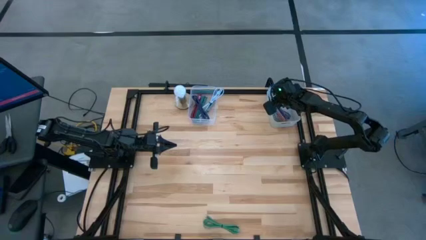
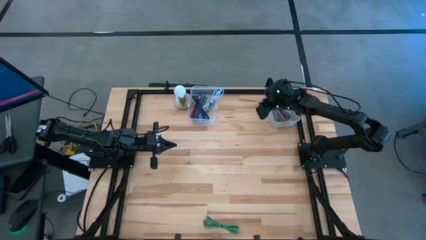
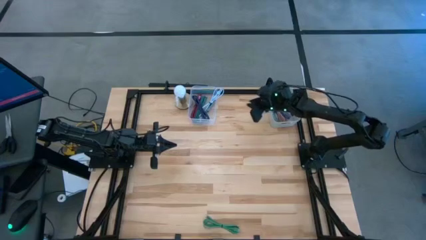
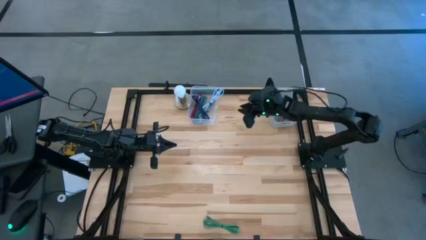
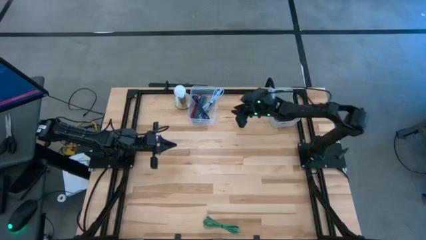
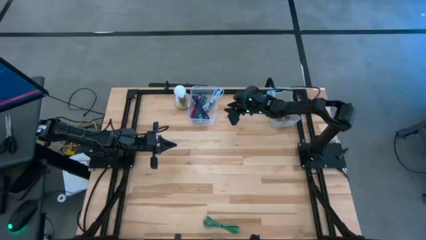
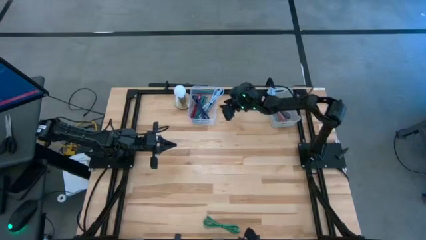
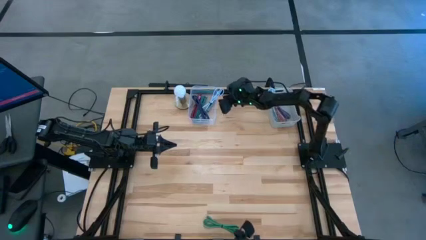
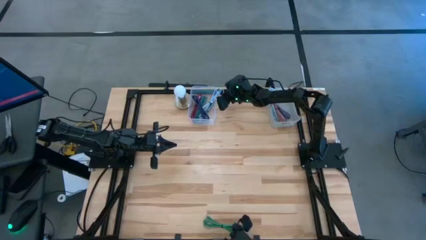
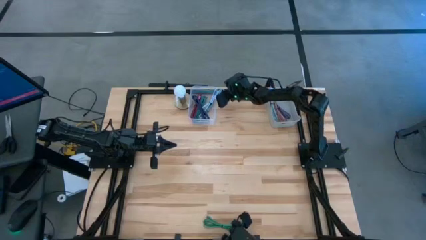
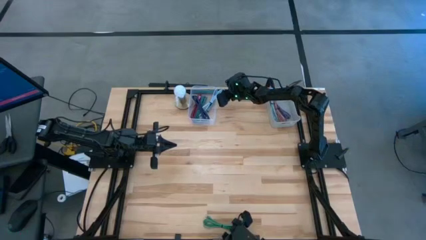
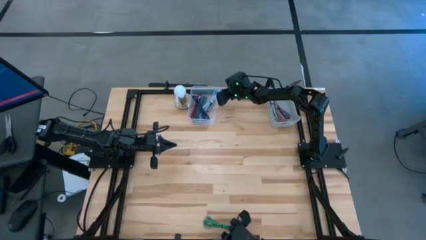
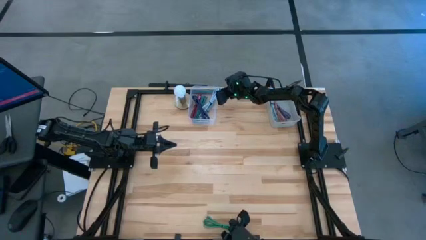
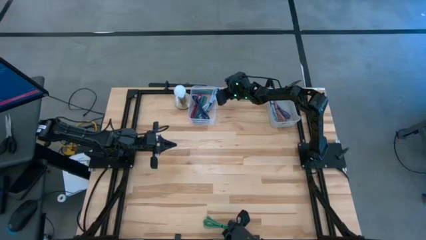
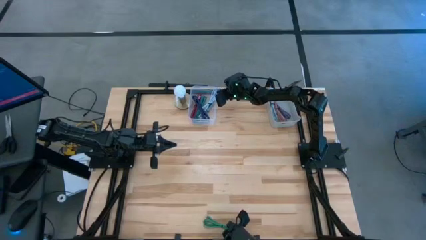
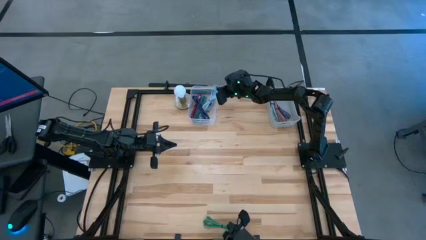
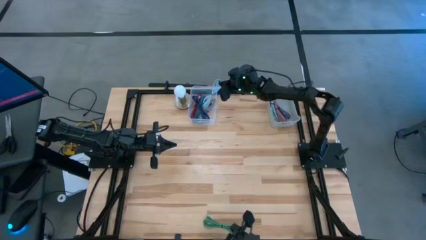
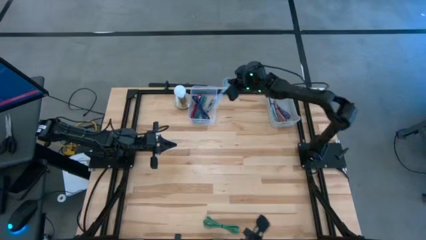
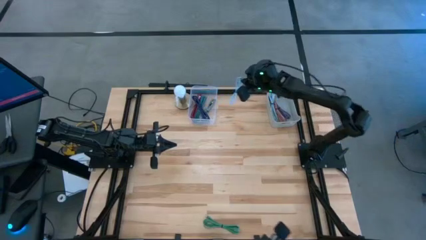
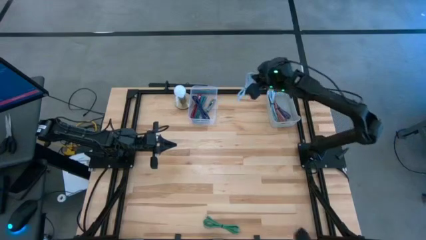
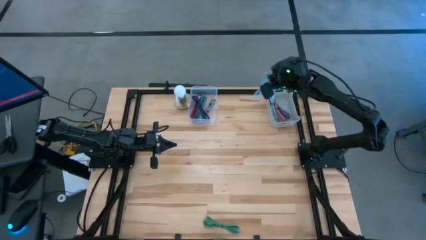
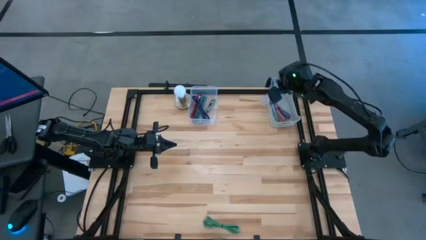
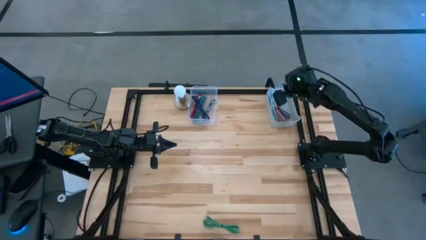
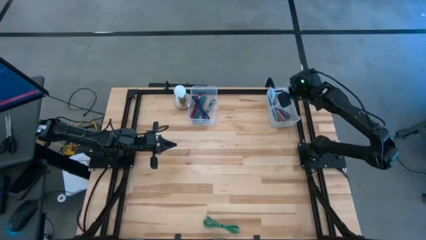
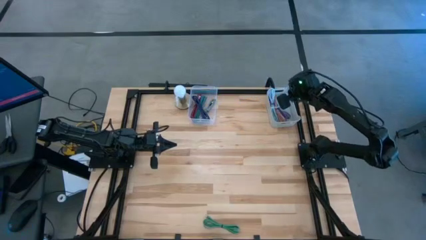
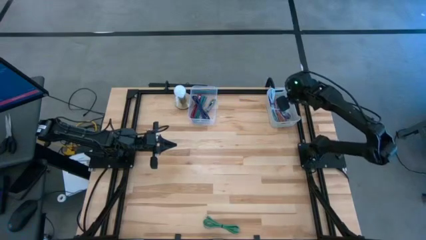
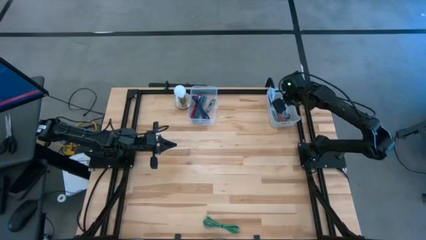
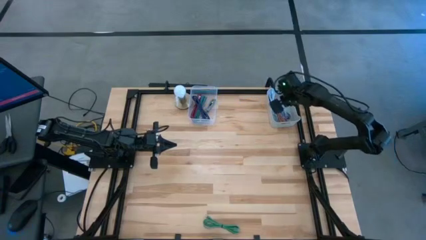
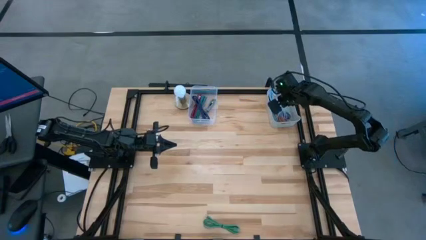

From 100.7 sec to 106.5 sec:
Task: Pick & Place USB Port
Put the light blue charger cable into the white bin

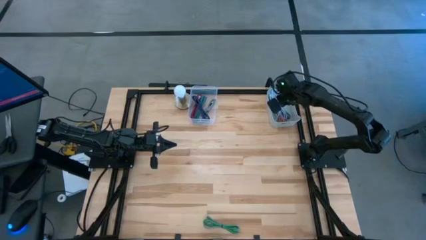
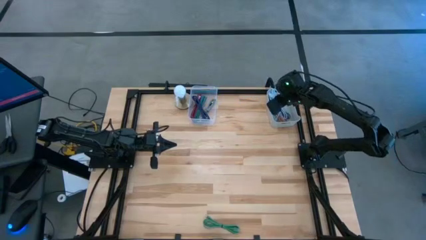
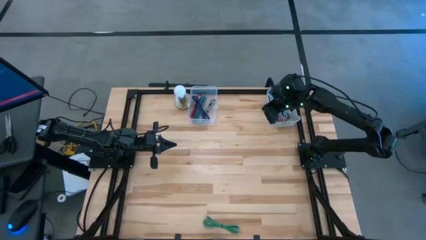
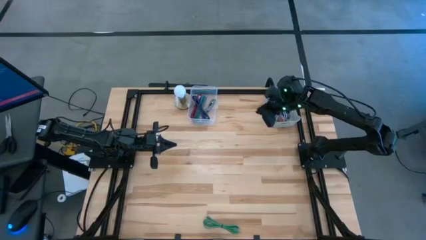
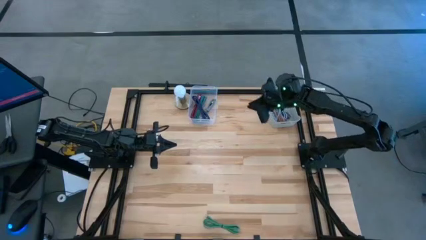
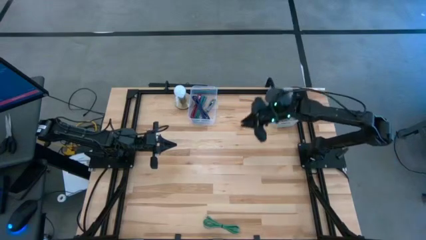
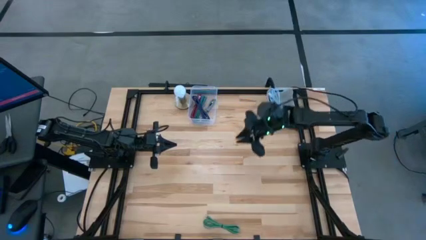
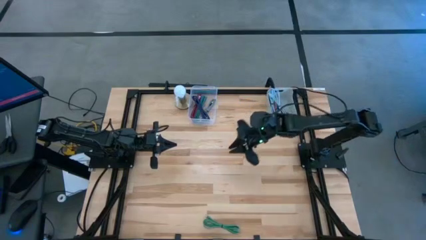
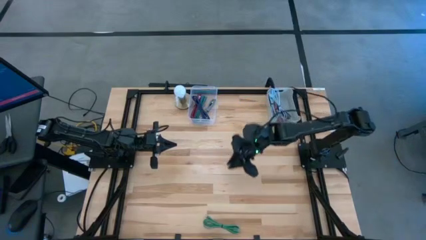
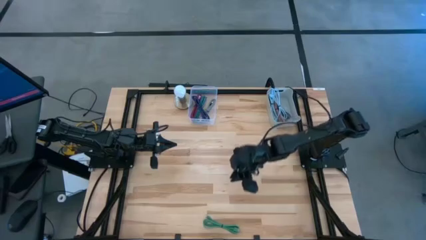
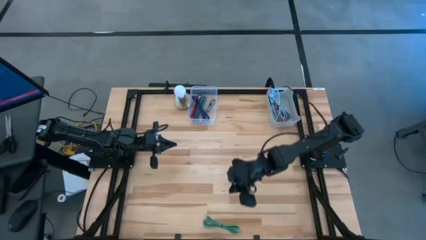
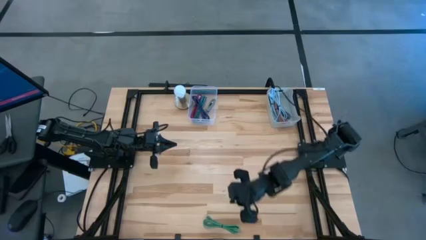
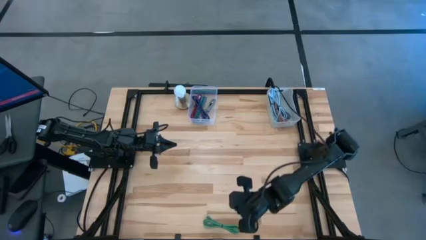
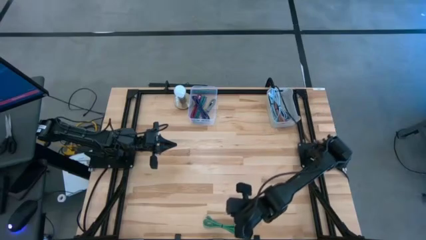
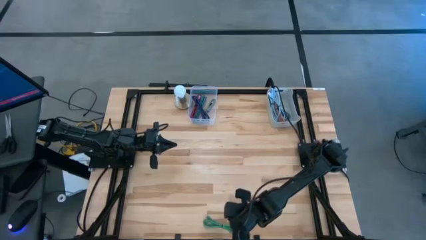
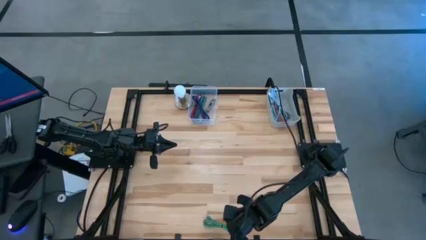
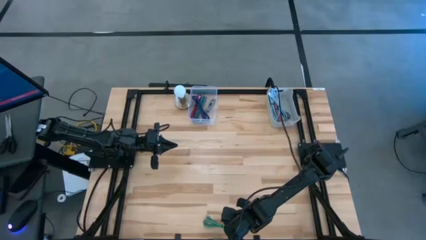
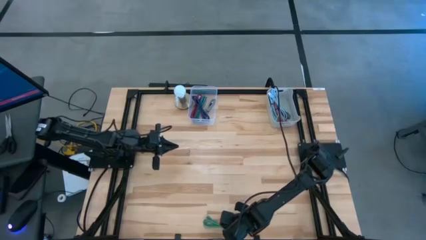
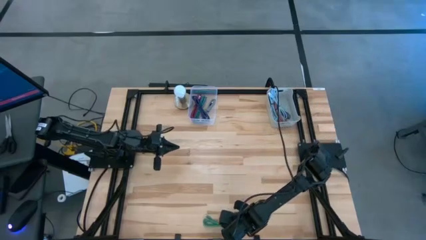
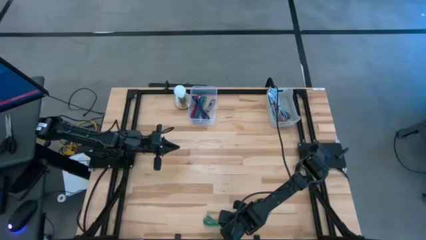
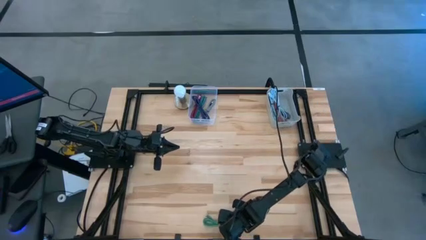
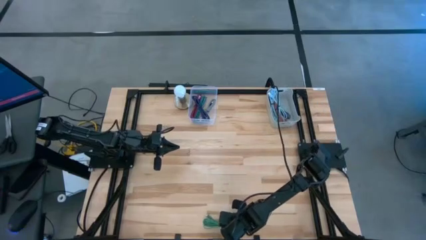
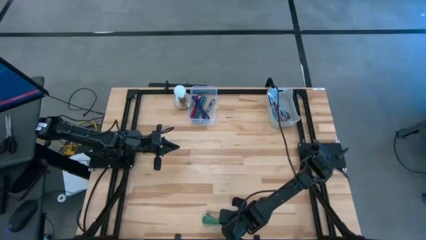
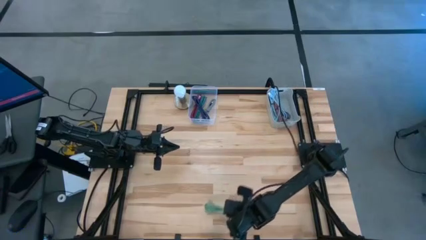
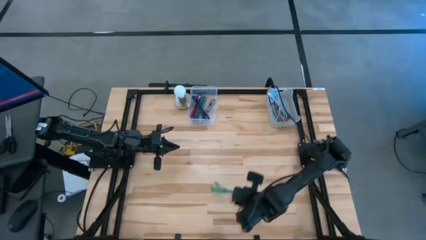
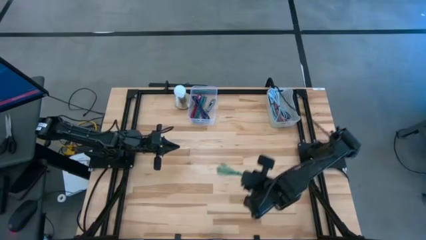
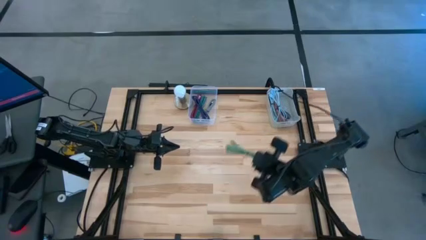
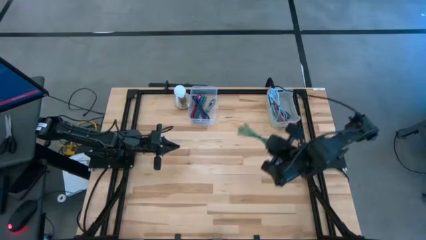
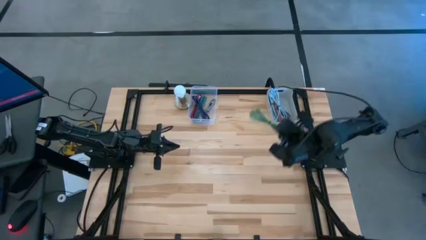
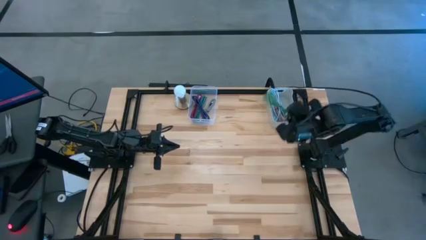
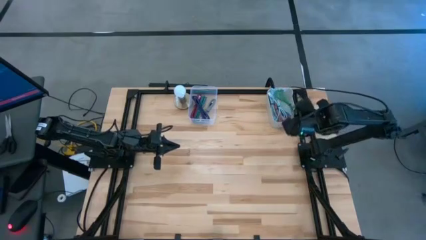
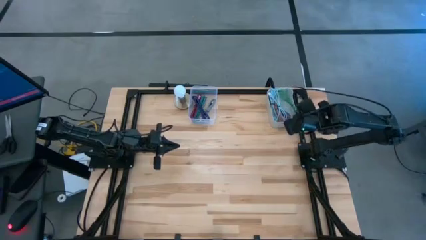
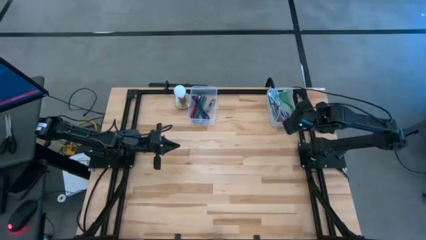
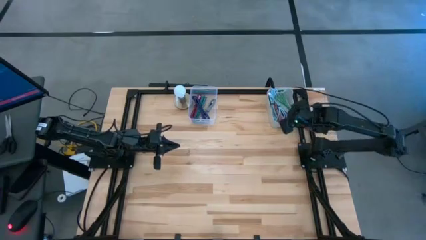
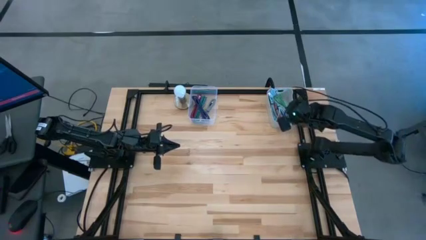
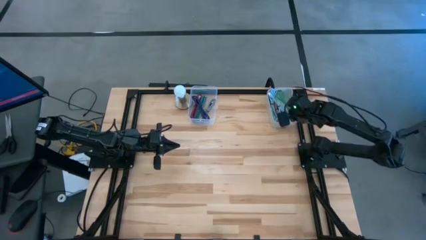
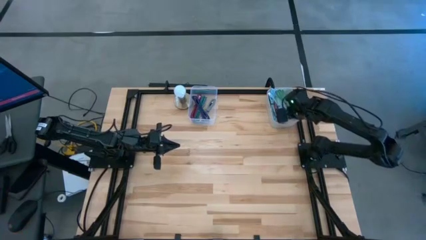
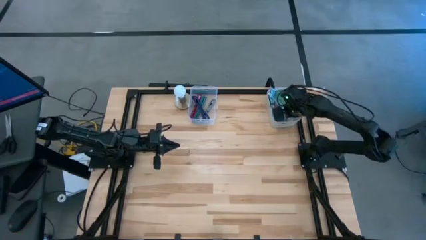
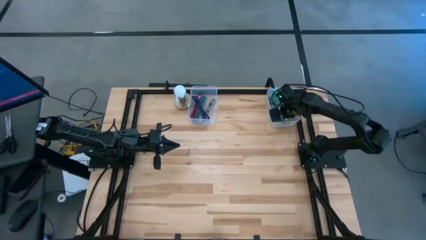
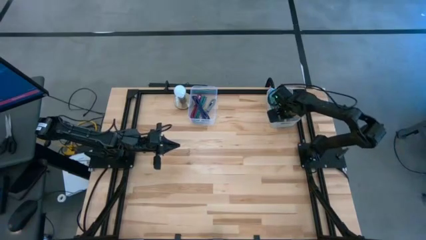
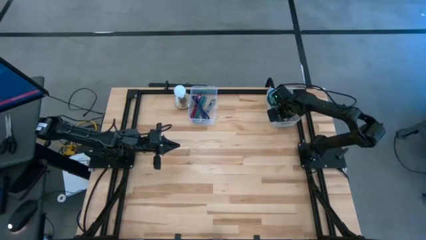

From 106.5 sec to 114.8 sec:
Put the green charger cable into the white bin

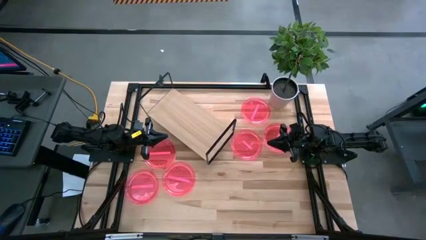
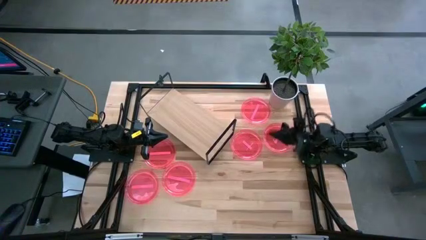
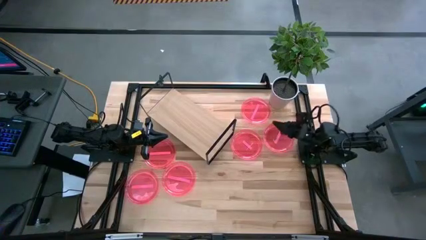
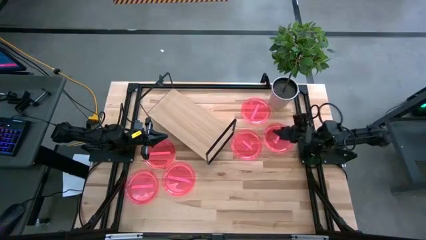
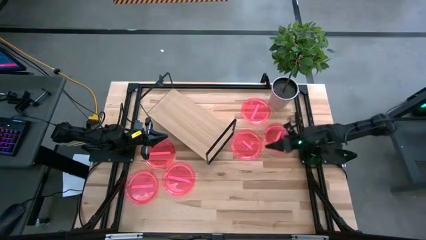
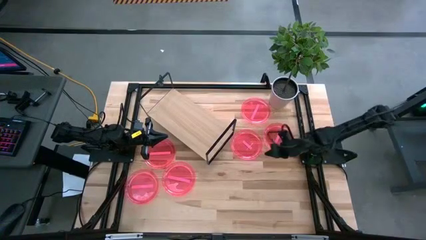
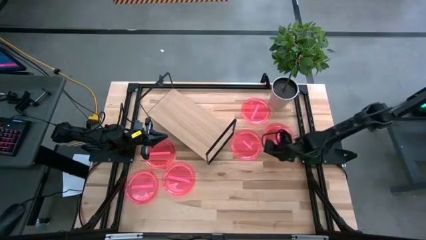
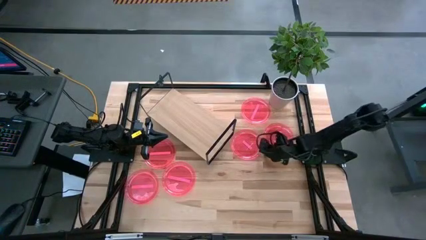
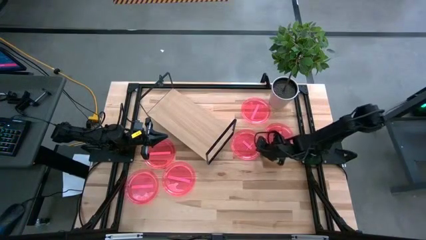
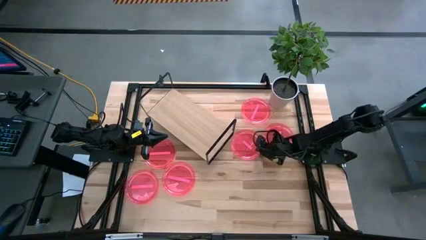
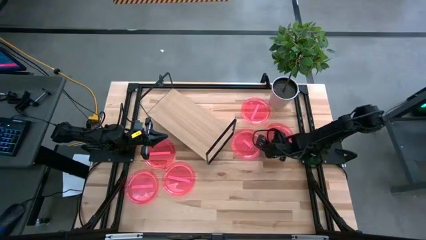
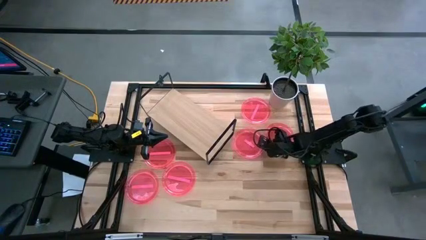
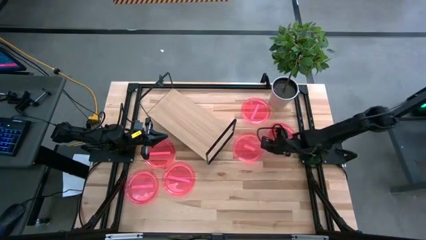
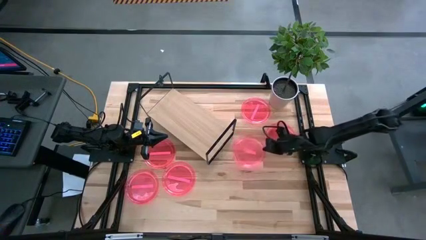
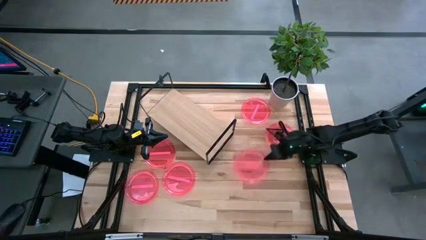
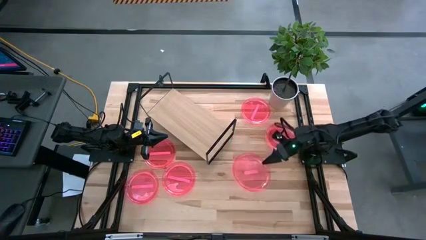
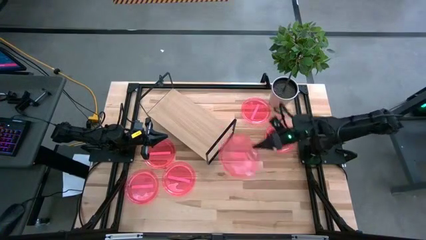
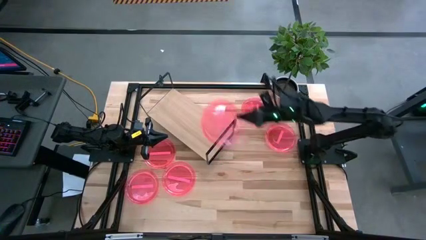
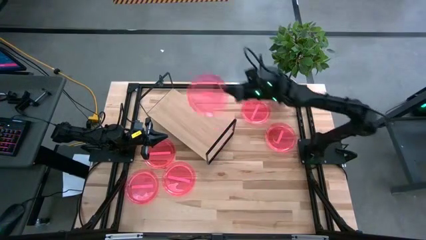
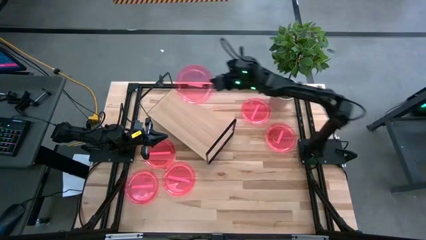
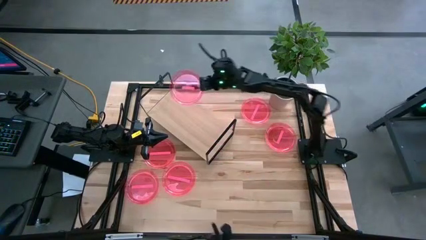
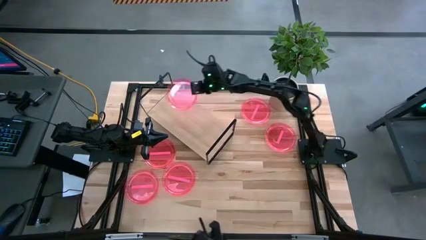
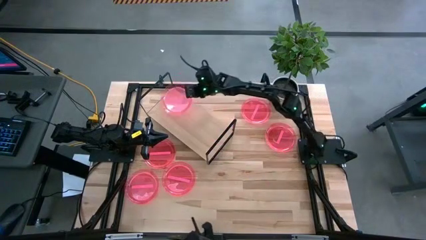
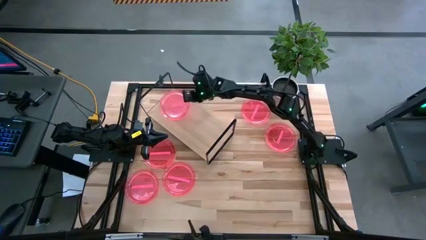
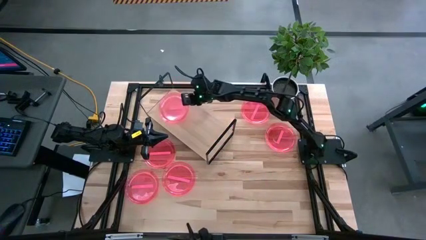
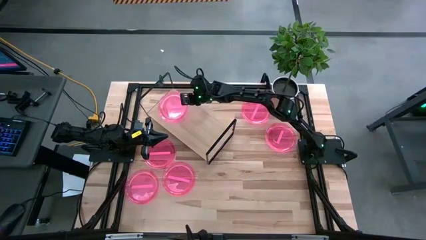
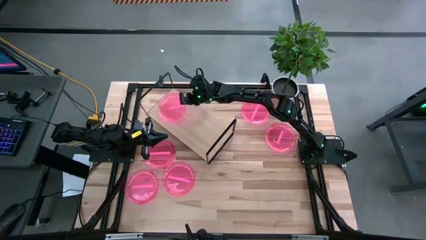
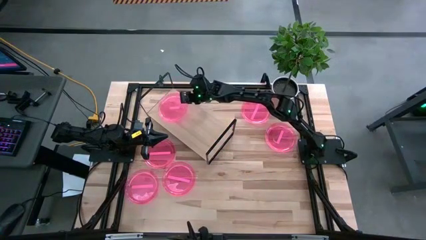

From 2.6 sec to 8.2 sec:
Task: Place and stack plates onto a shelf
Put the pink plate on the shelf
